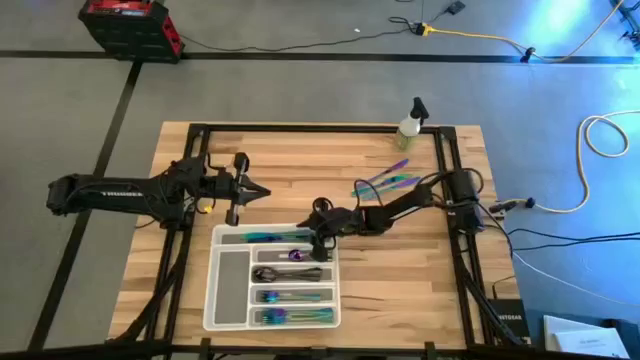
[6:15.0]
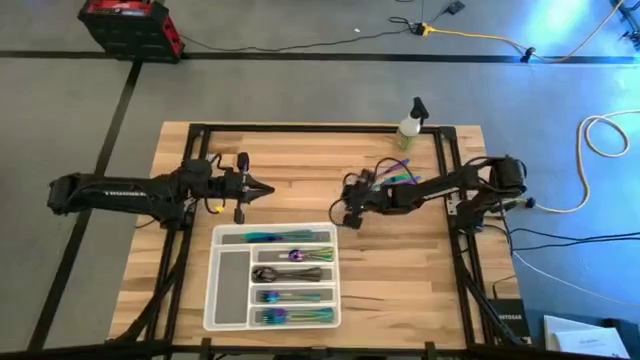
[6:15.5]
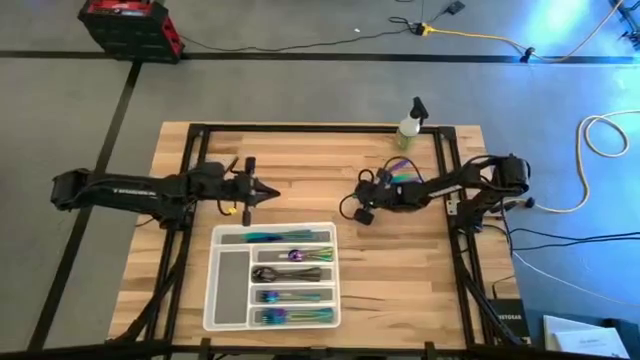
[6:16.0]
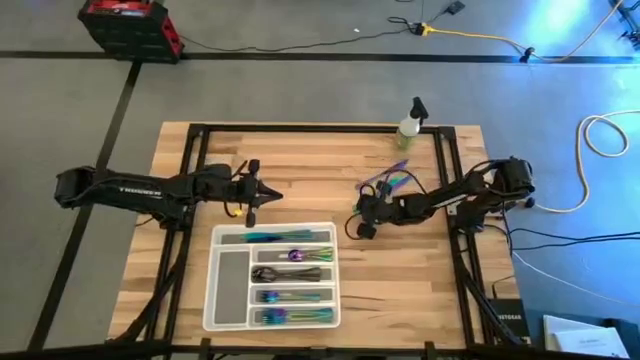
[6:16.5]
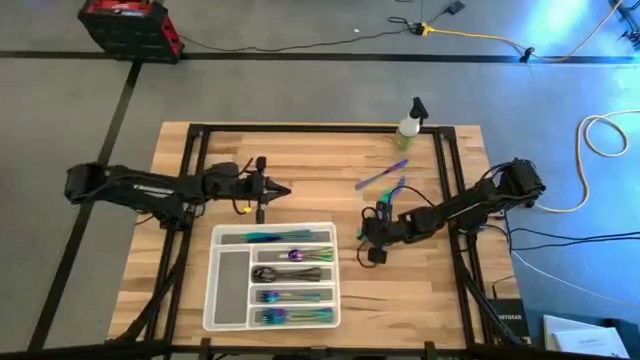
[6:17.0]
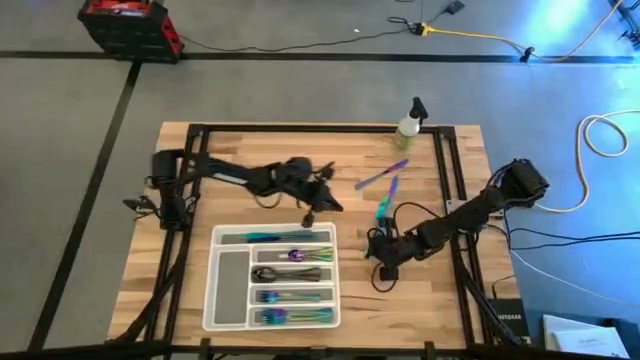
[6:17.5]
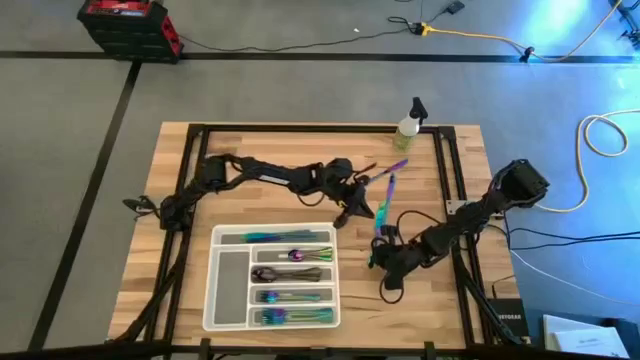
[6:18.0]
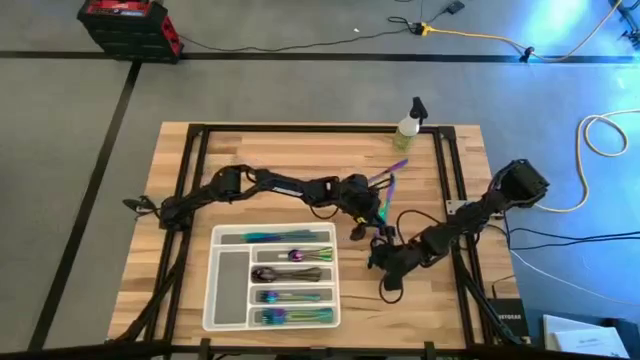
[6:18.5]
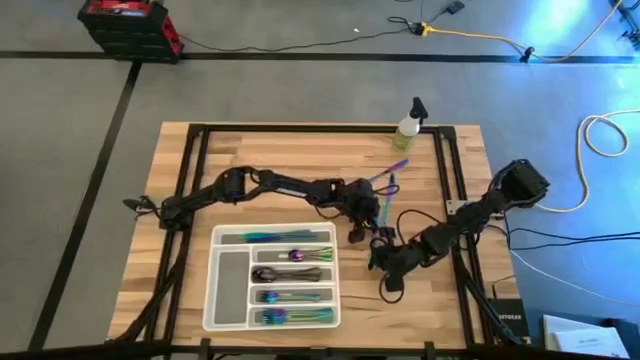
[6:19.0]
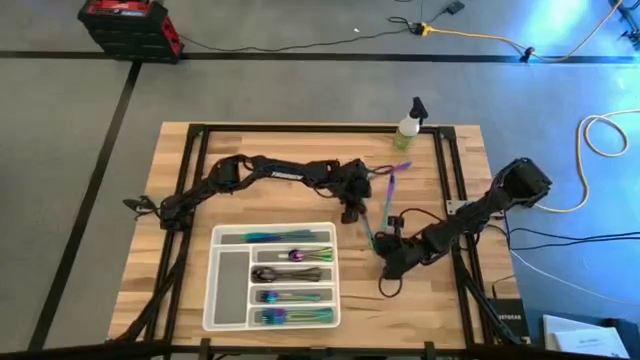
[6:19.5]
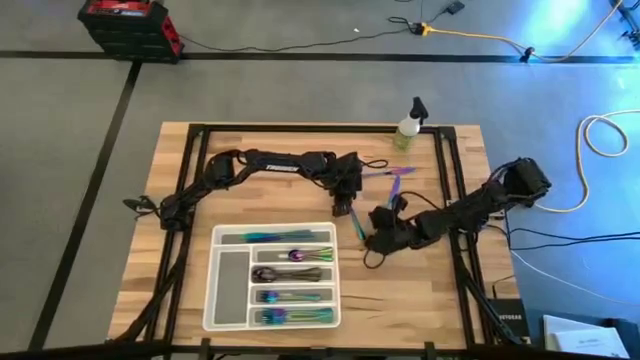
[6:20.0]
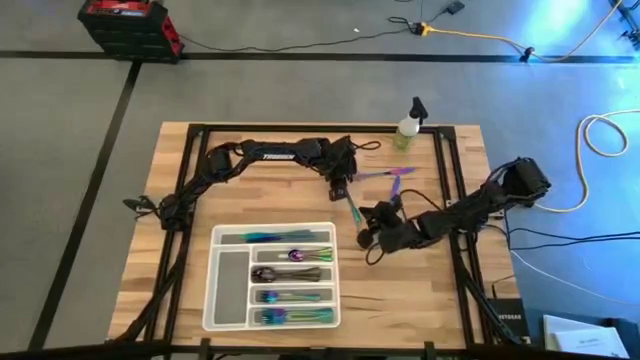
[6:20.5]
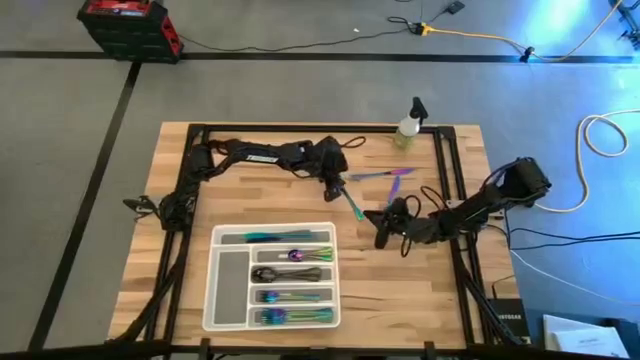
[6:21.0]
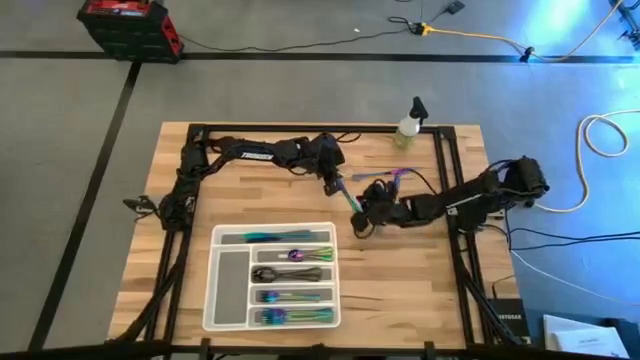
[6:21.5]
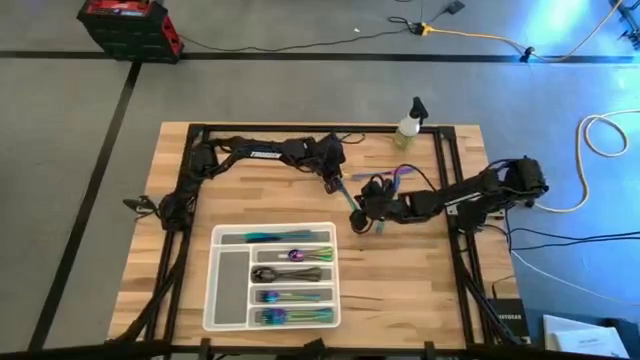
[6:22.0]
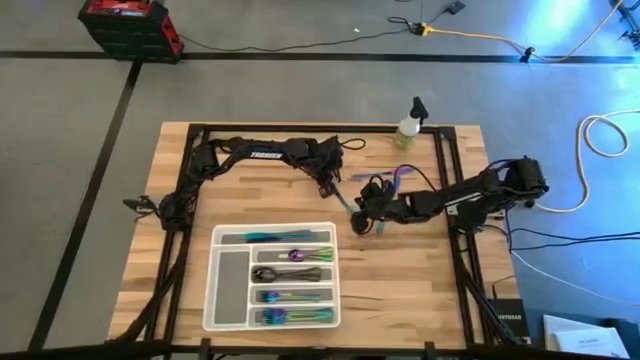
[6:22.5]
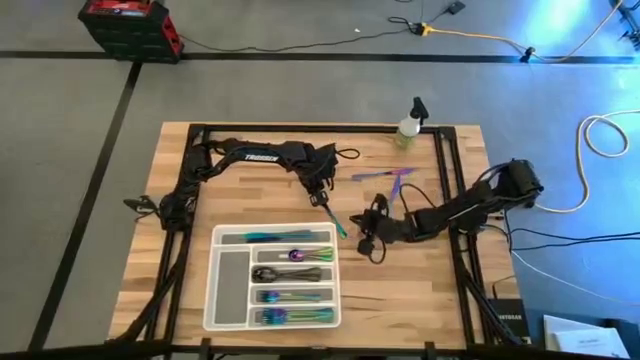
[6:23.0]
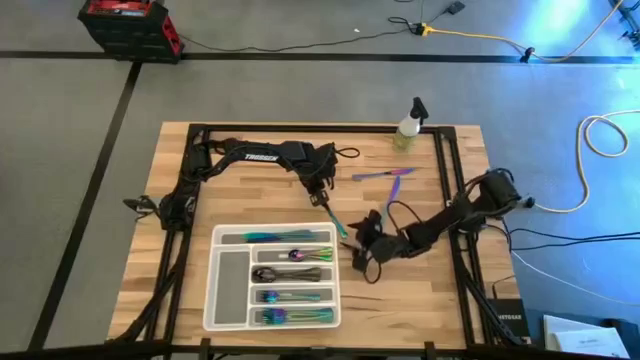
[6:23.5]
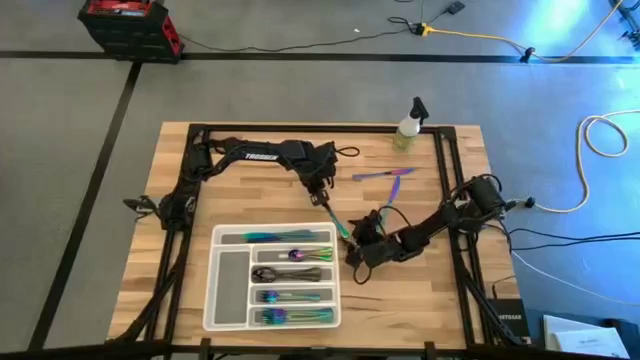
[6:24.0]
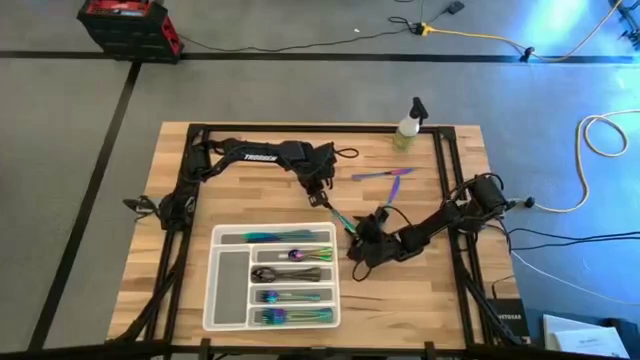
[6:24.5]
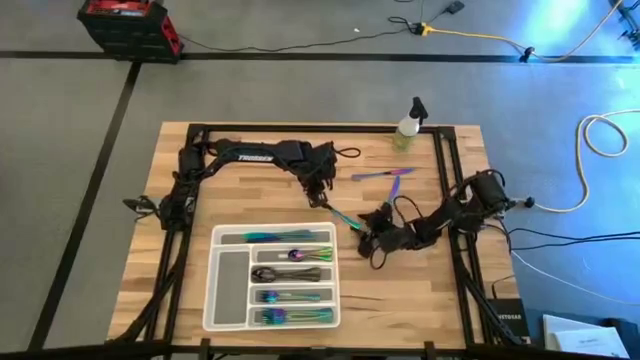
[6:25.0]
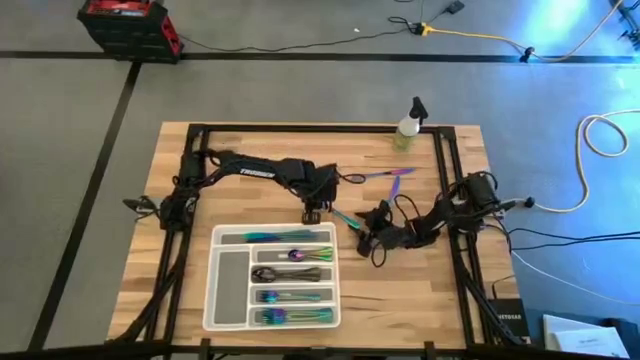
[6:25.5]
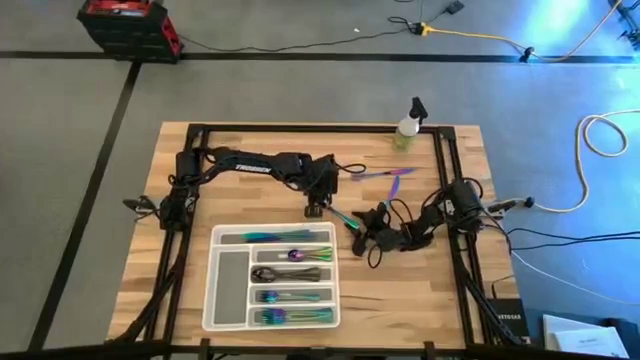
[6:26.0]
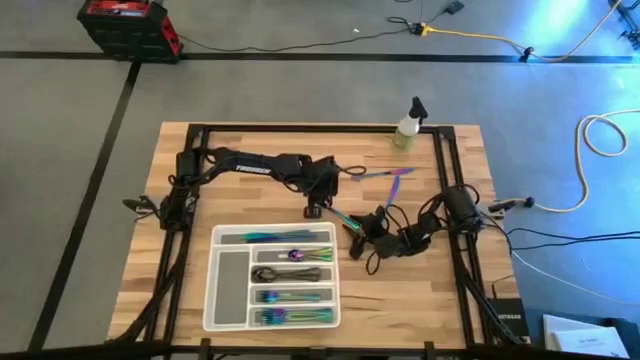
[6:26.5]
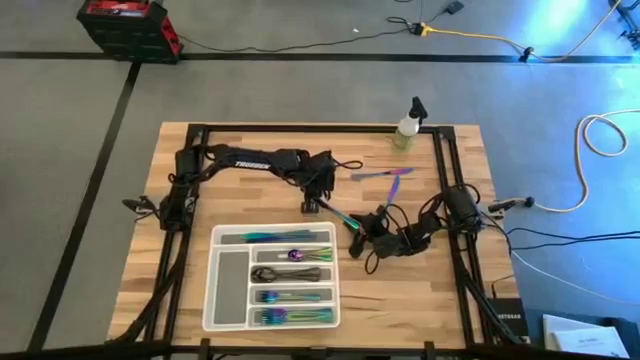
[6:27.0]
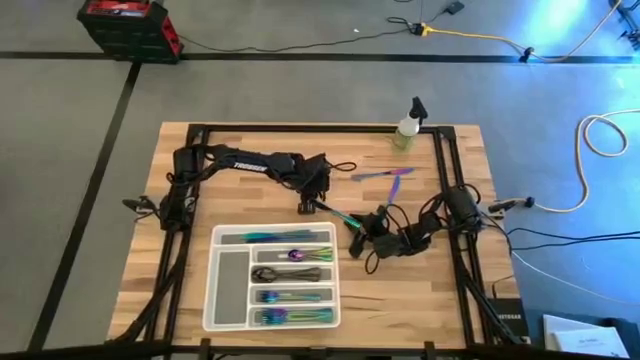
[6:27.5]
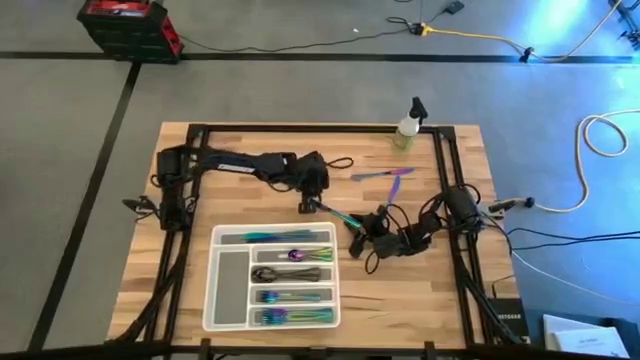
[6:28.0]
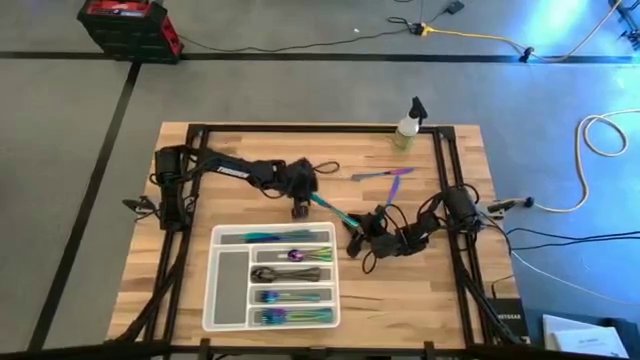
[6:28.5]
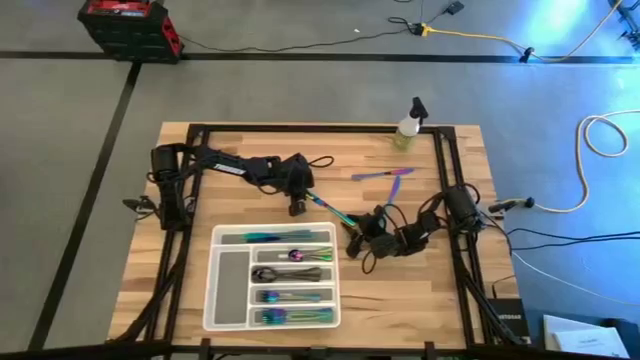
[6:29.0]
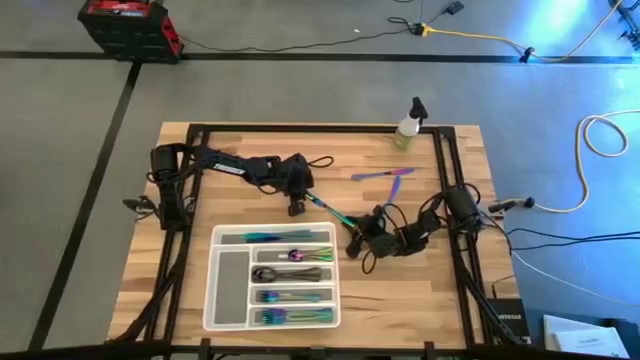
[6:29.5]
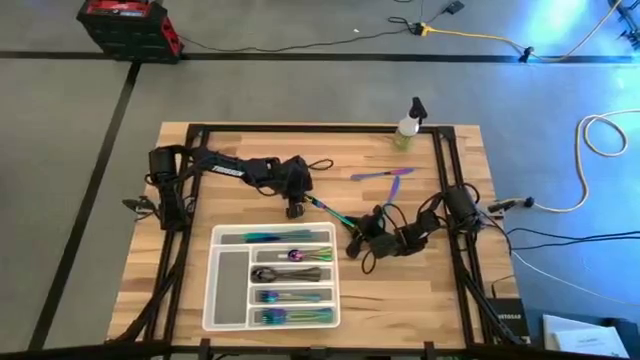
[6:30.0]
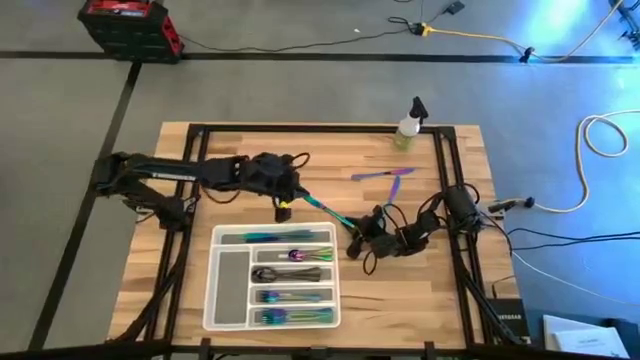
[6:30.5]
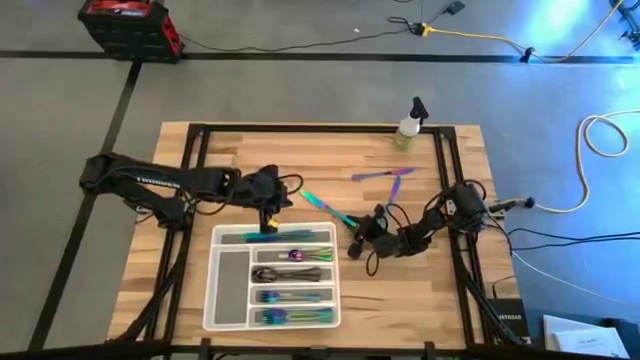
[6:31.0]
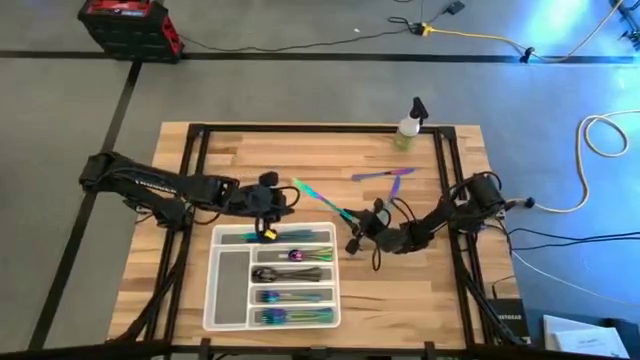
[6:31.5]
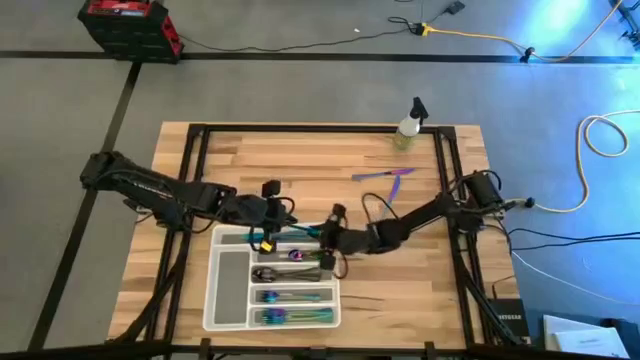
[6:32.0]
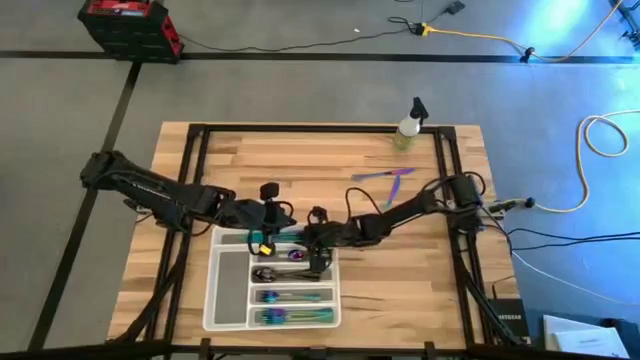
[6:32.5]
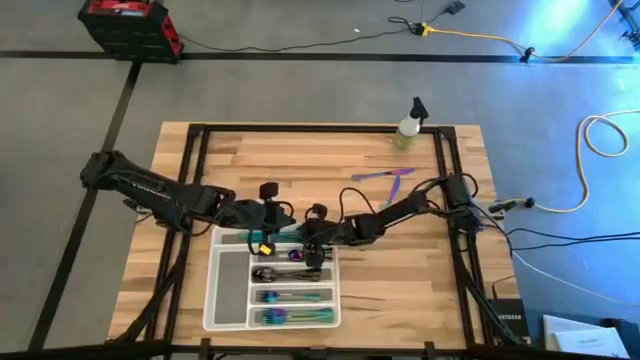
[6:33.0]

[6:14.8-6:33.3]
Task: Sort silverware
Put the blue table knife into the white silverware tray

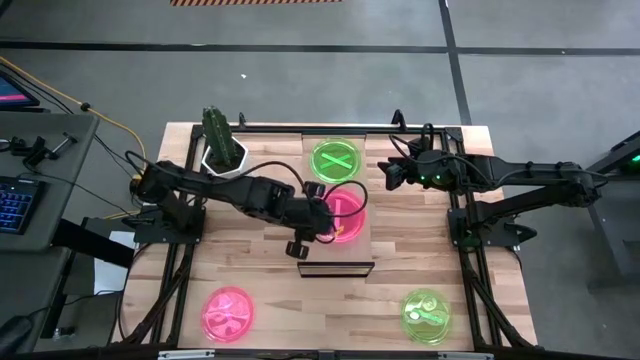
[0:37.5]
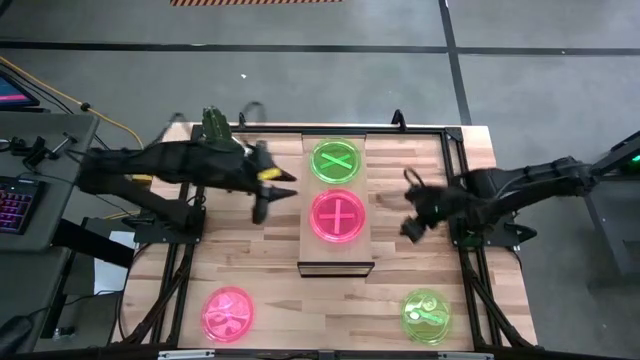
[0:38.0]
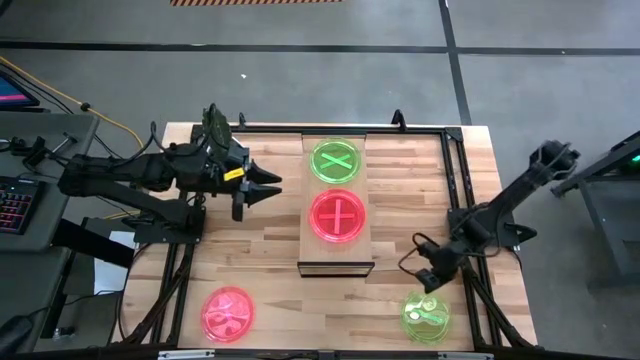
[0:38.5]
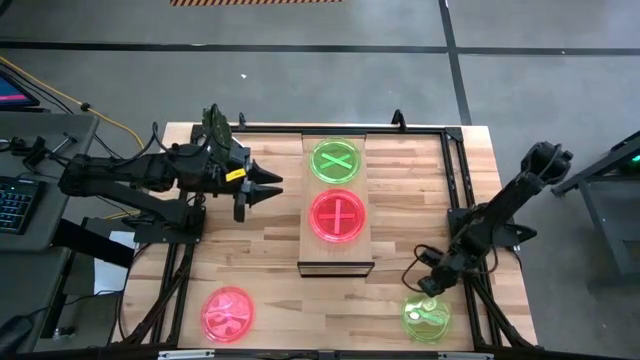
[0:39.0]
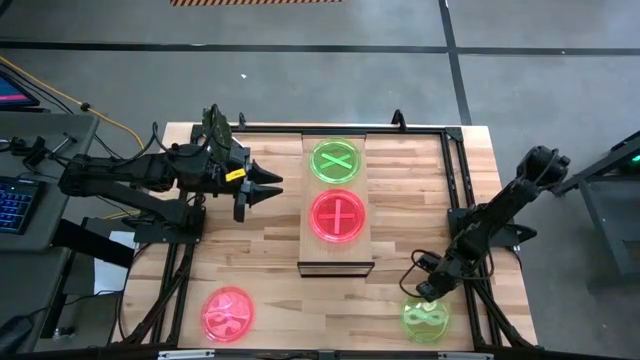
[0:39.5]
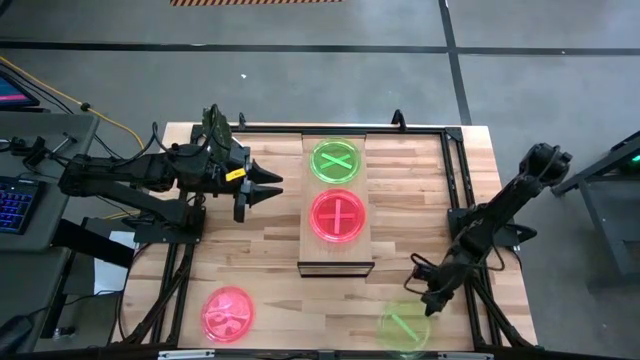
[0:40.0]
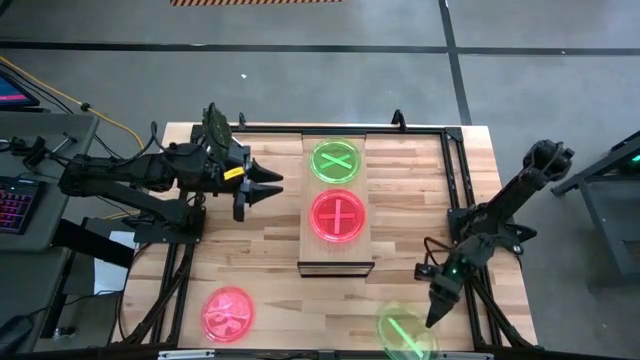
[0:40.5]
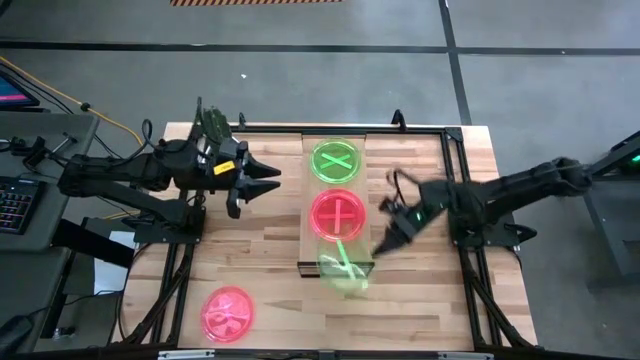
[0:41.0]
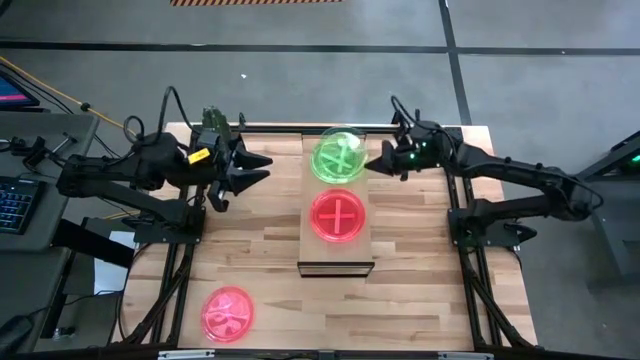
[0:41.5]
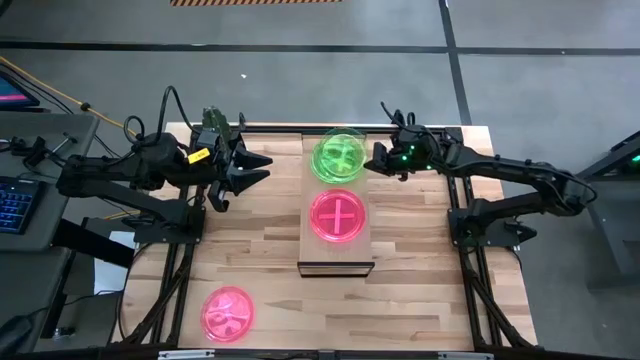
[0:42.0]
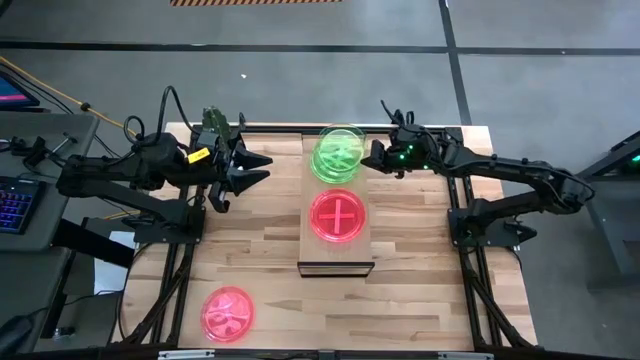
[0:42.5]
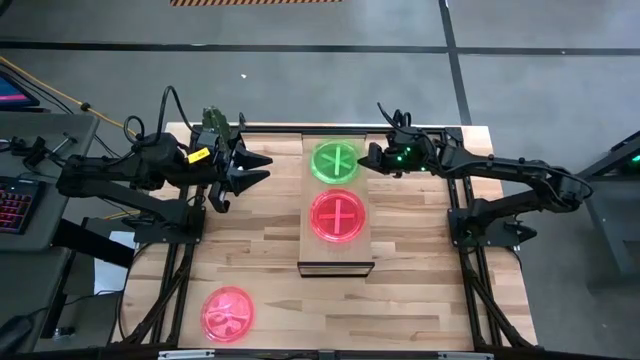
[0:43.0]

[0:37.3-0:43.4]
Task: Place and stack plates onto a shelf
Stack the green plate on top of the other green plates on the shelf
